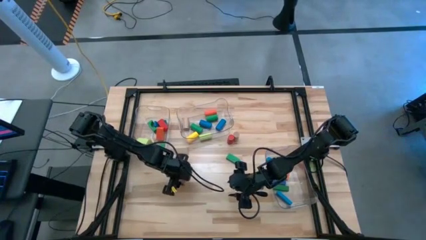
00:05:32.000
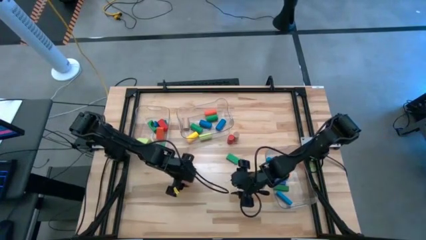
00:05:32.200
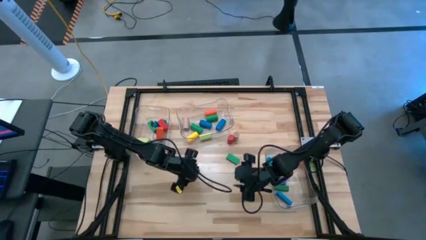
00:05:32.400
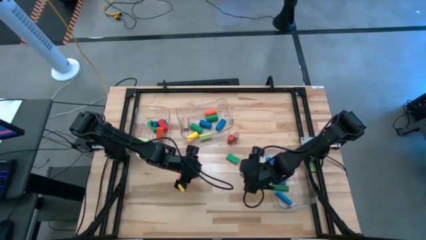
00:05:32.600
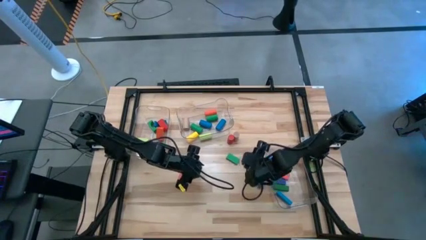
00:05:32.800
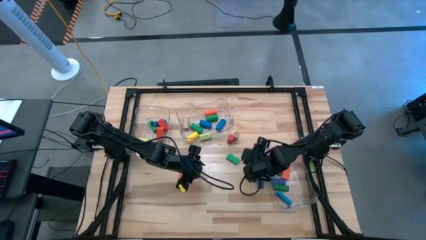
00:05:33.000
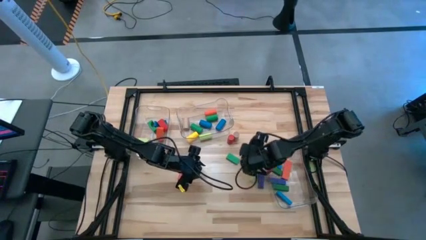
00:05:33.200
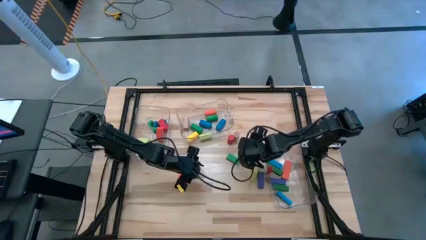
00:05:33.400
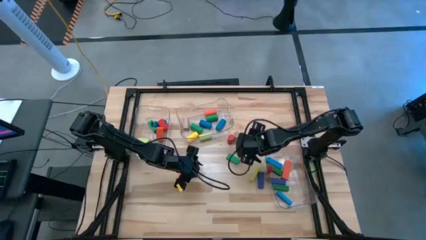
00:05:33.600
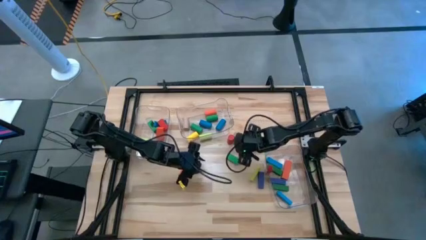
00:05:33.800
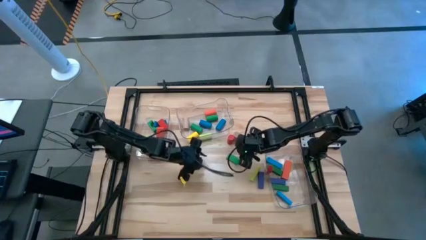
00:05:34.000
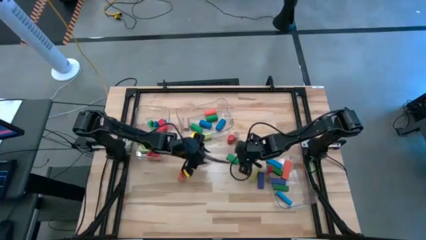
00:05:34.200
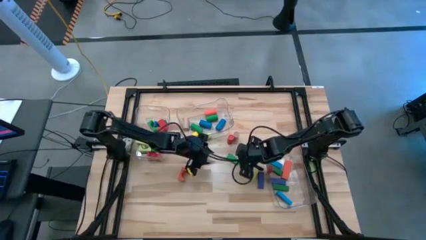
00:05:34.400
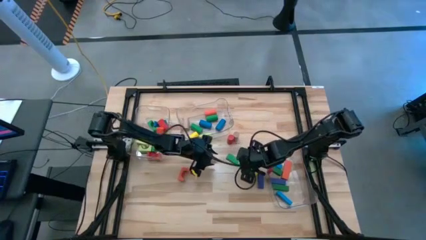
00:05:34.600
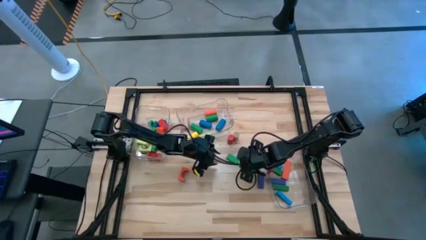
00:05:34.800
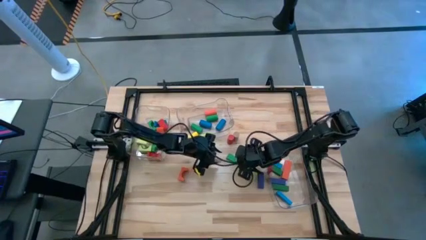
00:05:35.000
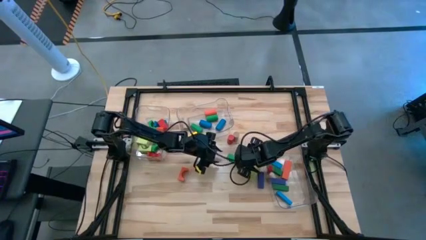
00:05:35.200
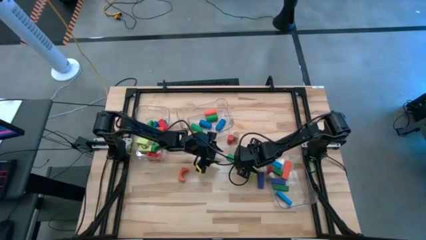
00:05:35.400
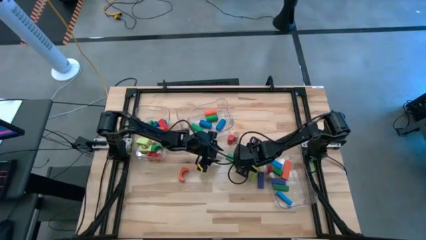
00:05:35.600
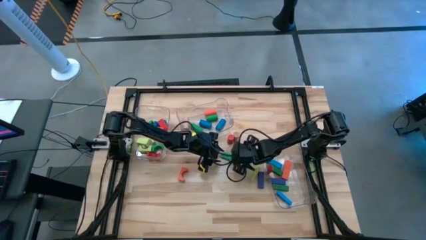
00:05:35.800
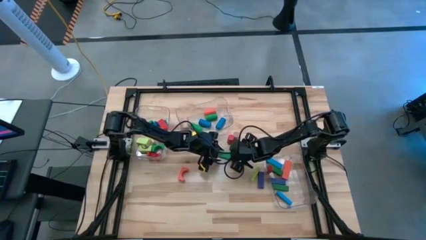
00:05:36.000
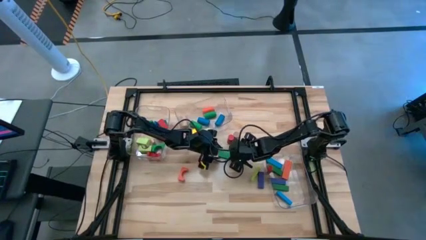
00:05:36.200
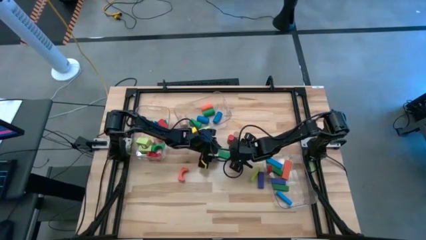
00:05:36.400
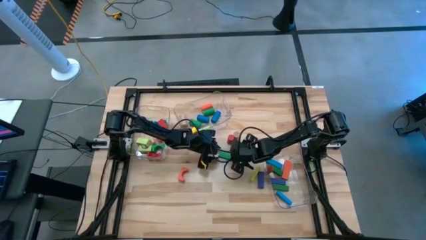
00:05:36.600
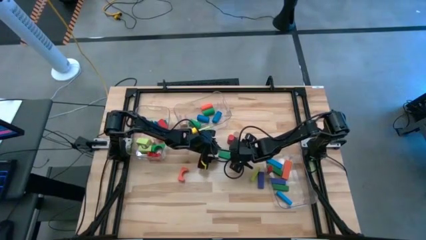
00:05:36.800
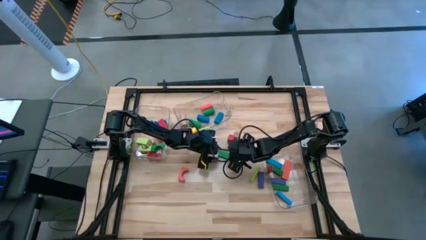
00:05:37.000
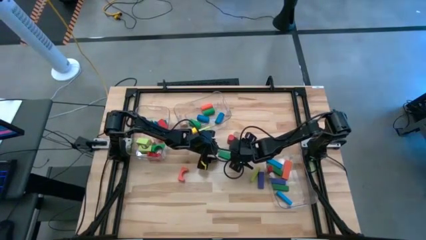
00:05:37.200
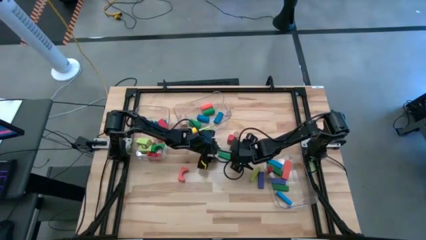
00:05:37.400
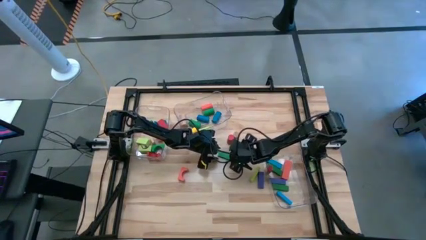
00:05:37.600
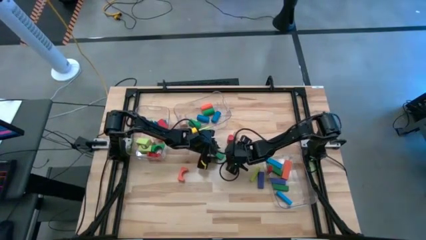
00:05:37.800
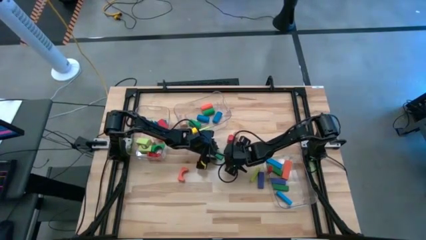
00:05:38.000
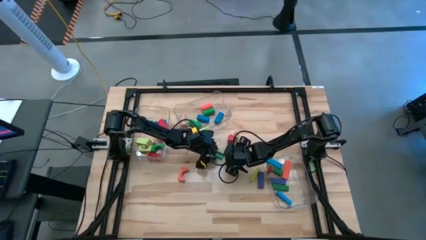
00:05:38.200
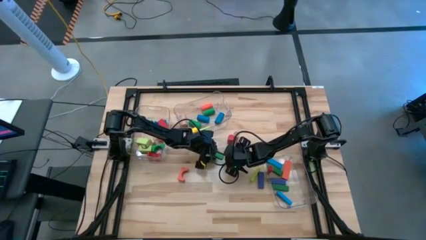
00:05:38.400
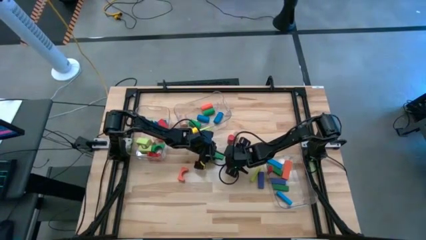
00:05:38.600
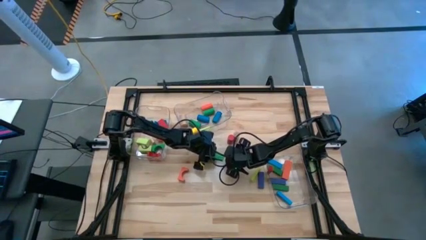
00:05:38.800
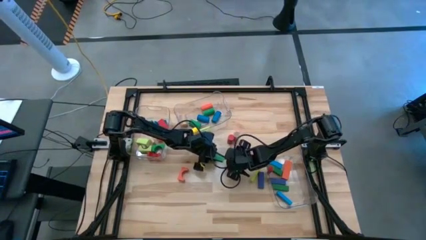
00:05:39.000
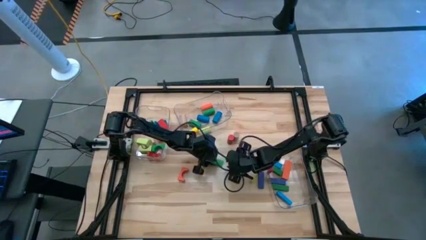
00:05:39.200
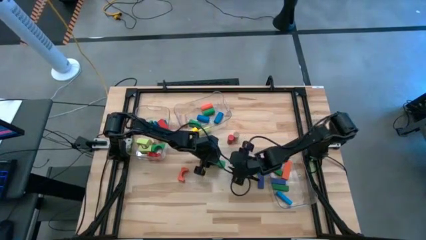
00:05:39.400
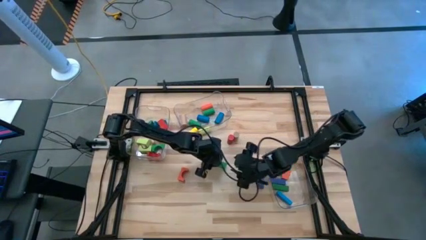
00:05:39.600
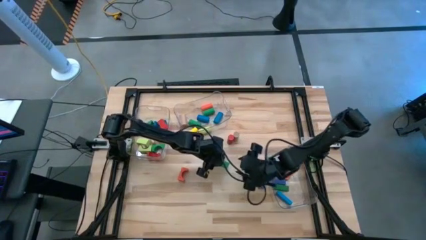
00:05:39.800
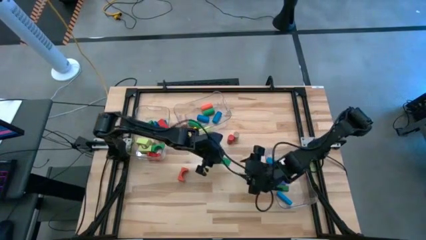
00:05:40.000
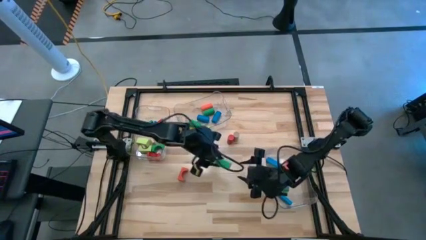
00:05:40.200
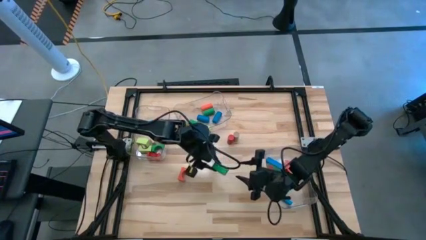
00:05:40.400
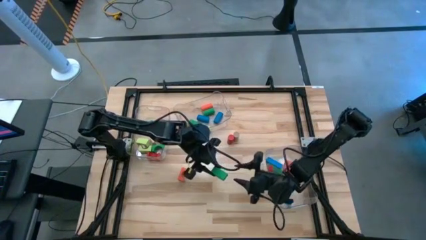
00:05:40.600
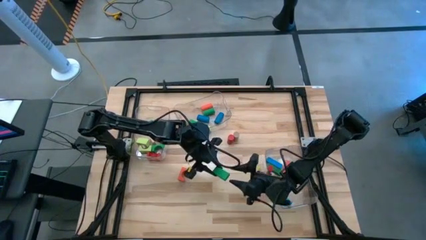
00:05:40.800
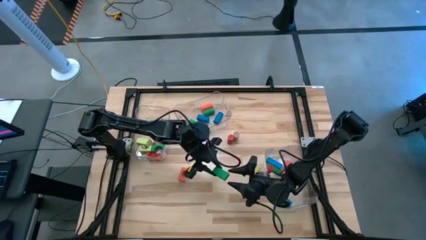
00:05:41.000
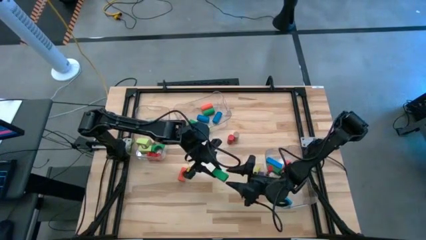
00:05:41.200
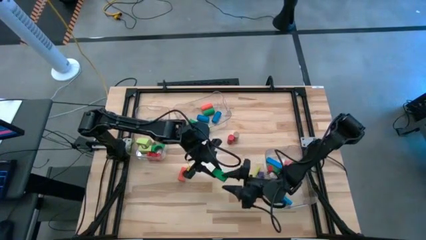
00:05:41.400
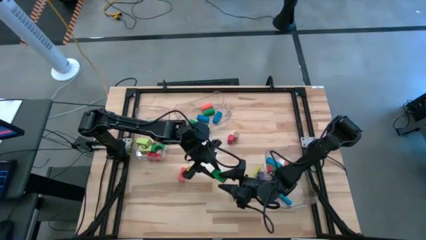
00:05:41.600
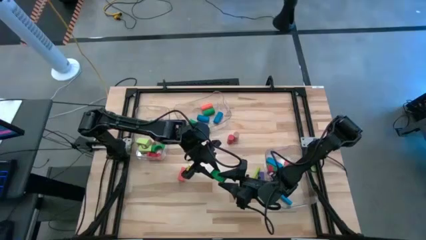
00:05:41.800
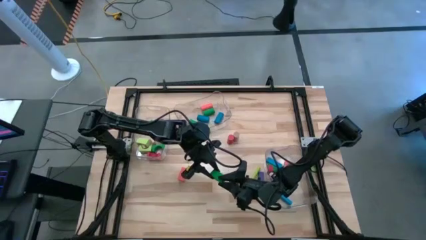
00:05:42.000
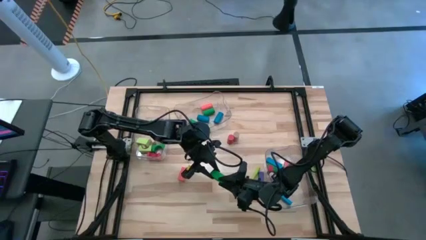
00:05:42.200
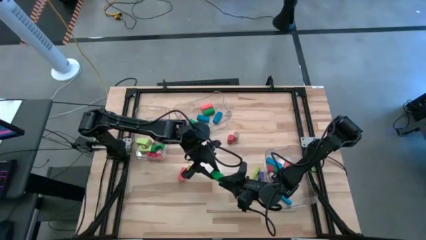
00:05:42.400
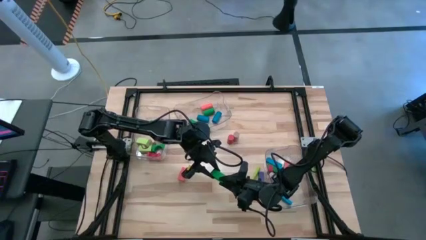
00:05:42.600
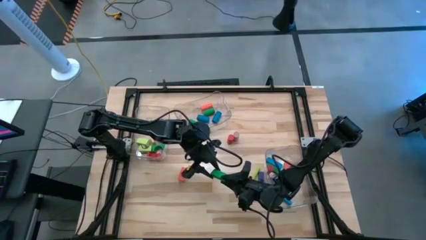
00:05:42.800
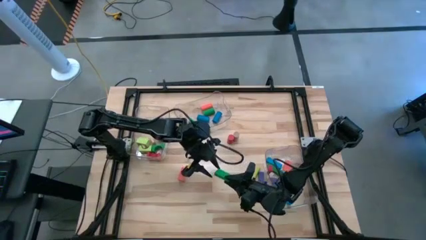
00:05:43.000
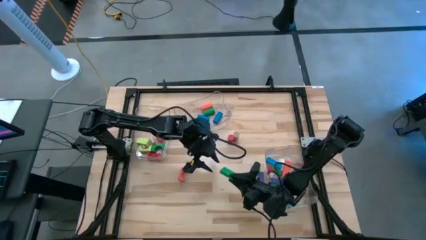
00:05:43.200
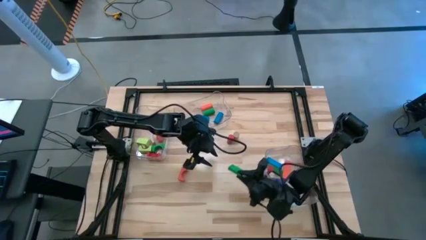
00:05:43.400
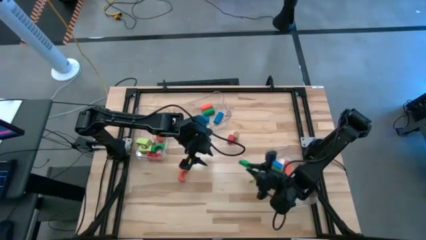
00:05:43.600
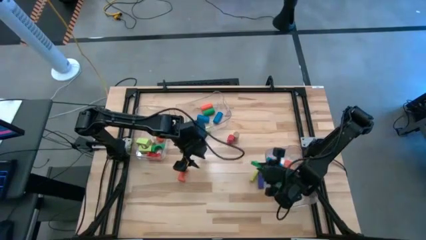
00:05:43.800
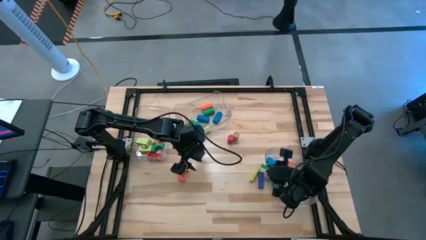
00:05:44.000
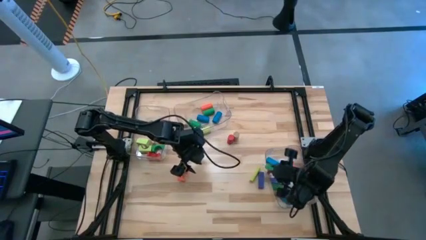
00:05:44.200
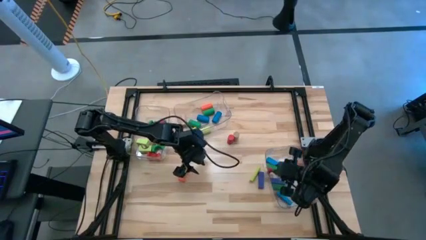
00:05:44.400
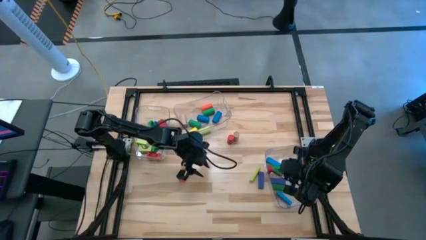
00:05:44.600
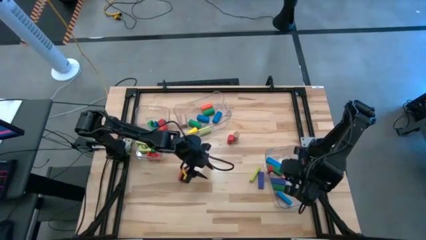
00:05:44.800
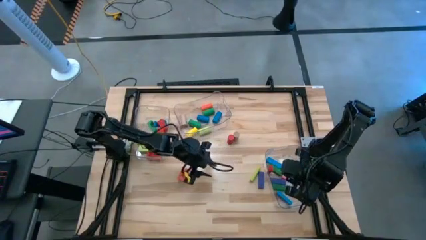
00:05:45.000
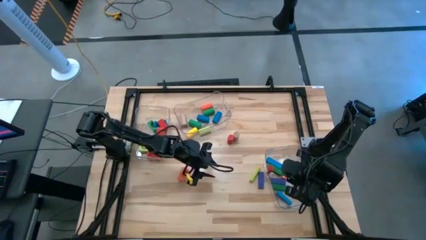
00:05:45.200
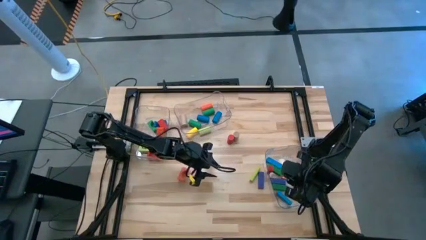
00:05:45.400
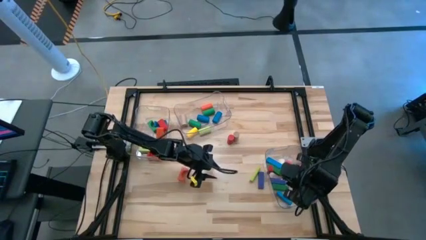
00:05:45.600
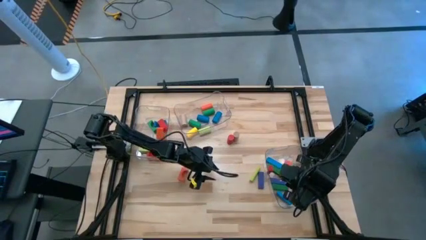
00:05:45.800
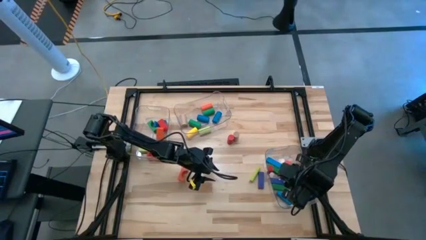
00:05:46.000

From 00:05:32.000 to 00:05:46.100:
Task: Sort blocks by size
Put the green rectangular block into the right transparent bin

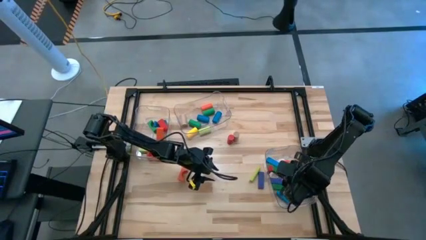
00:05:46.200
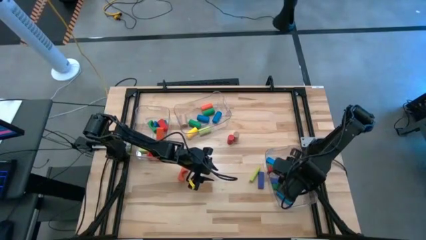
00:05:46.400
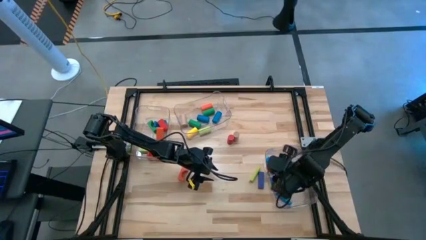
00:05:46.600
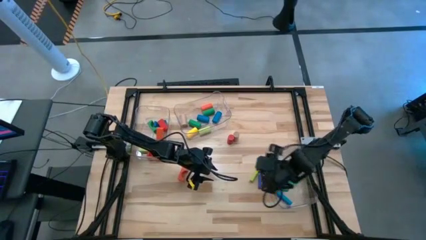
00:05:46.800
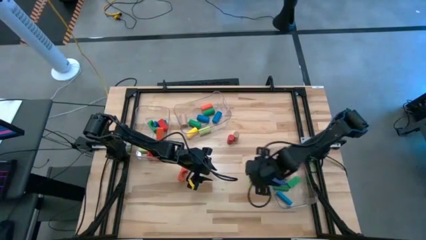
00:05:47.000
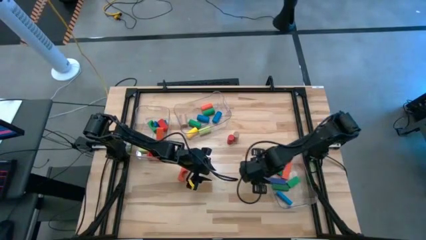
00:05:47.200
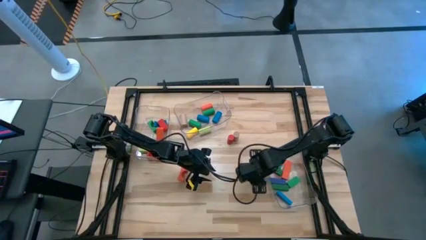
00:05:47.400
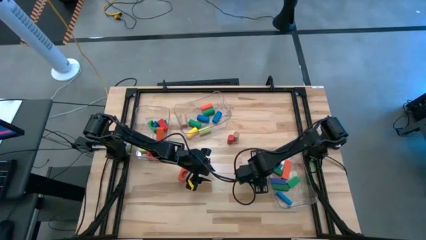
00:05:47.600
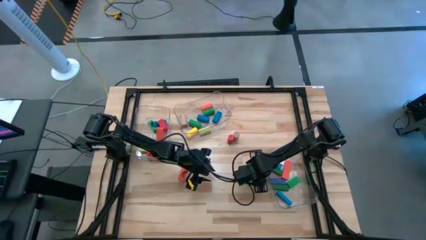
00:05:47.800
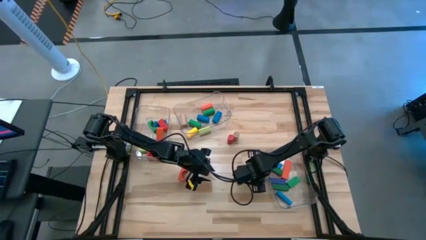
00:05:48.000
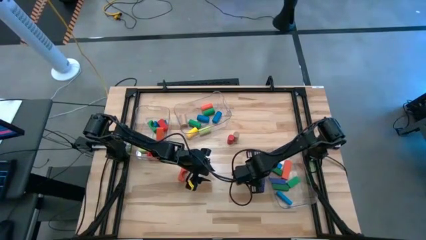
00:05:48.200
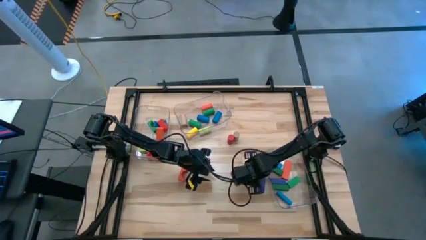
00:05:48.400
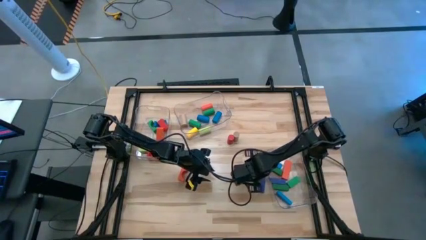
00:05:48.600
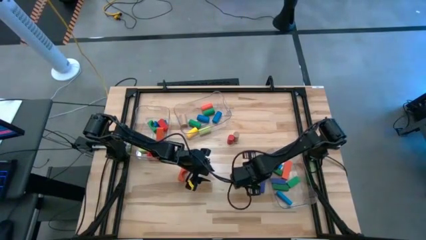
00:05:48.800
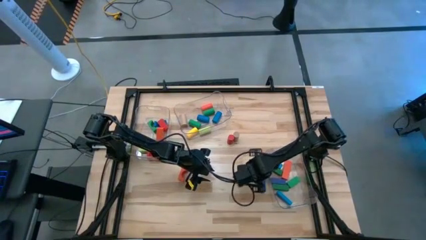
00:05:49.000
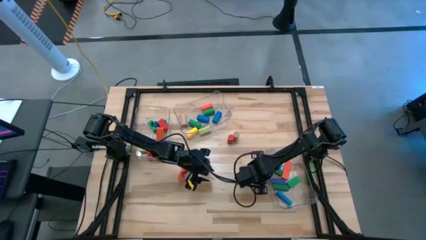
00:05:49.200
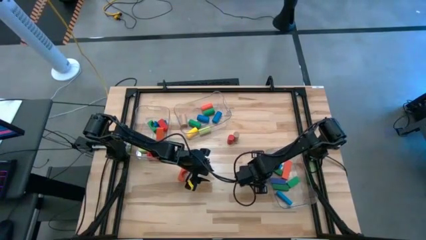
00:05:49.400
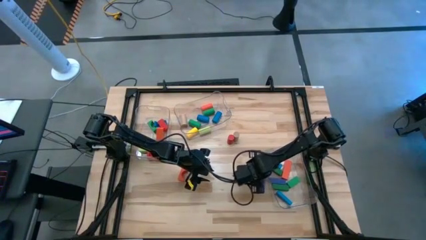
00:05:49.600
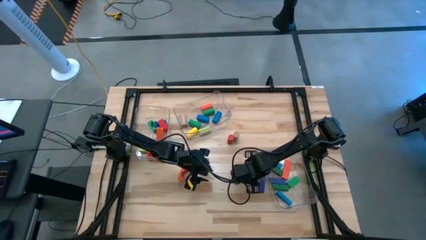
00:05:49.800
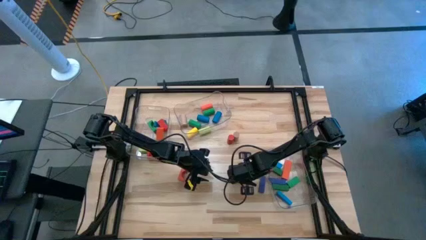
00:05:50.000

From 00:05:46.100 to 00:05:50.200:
Adjust the green rectangular block
